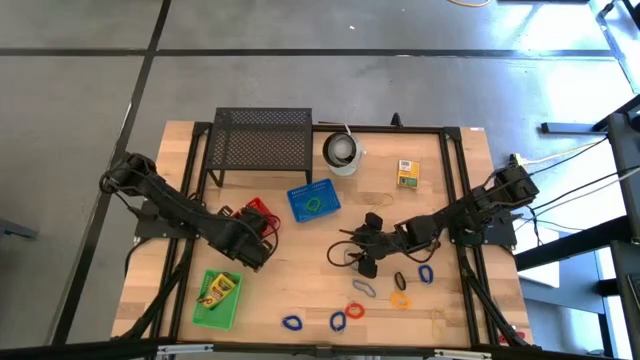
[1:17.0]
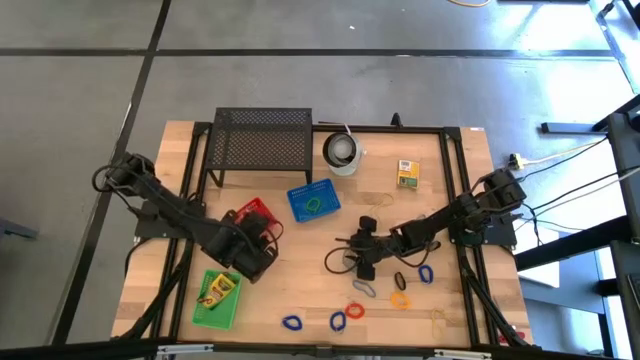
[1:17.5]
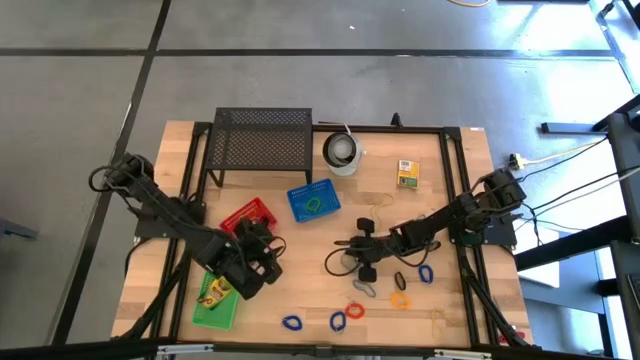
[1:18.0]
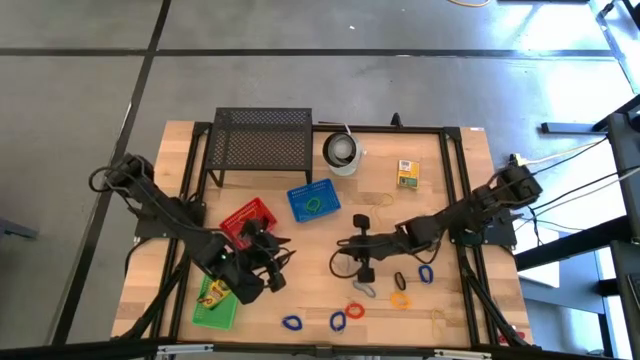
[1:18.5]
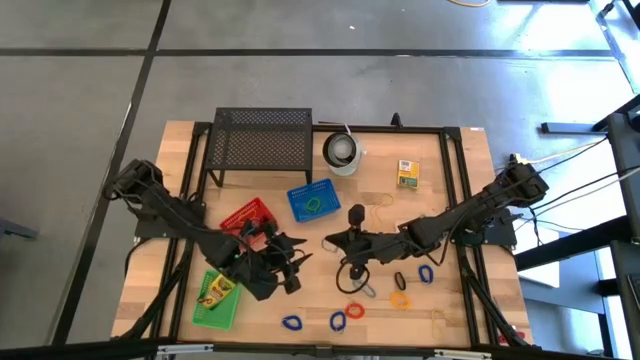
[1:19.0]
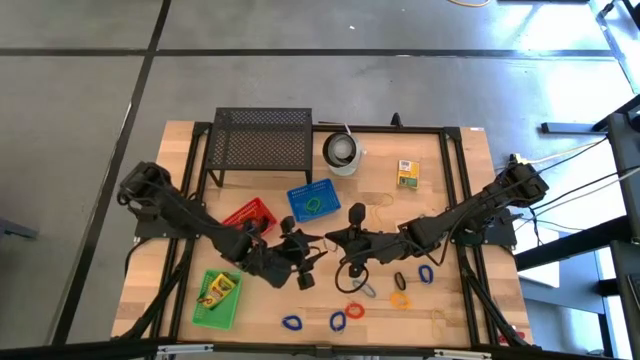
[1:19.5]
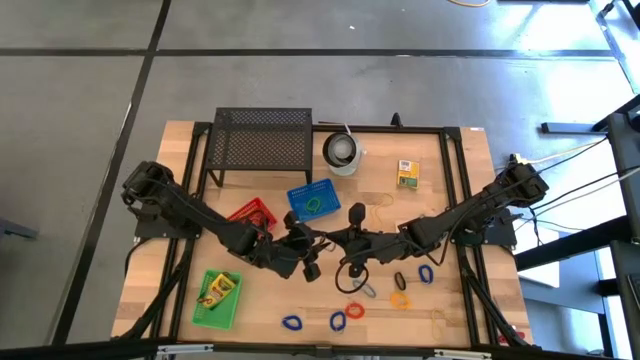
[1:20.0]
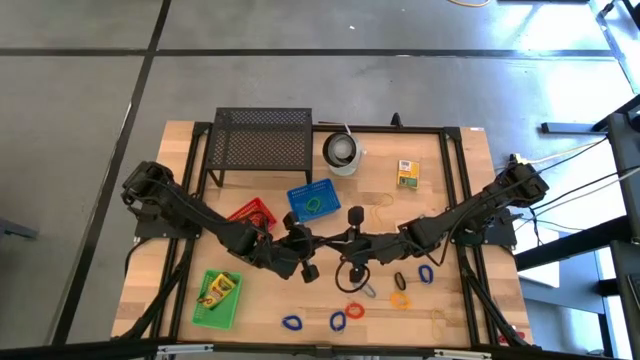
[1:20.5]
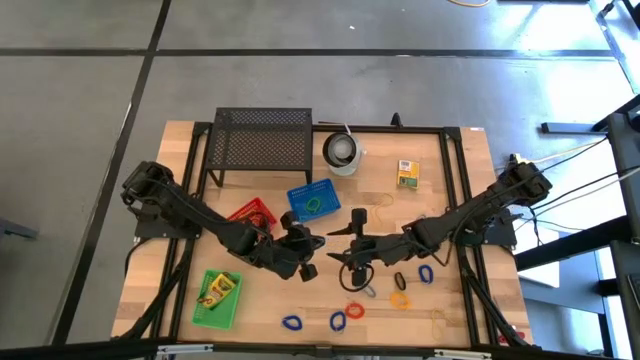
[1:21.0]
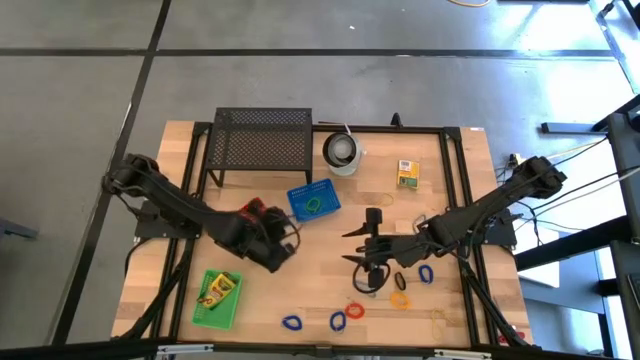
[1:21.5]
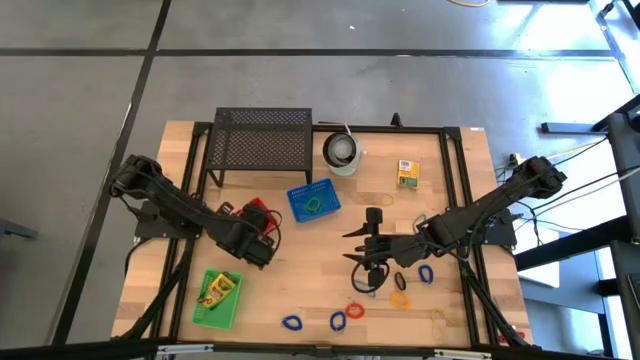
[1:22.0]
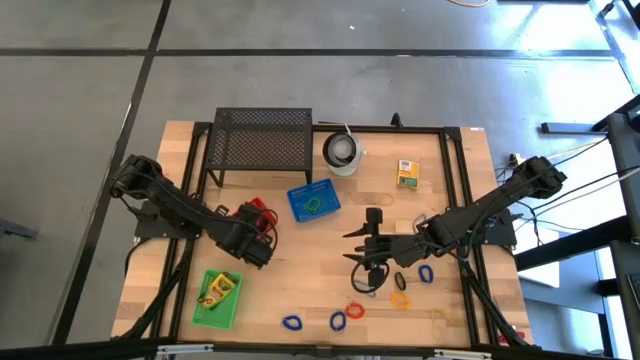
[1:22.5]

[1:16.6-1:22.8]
Task: Pick & Place Office Desk Supplies
Put the blue rubber band into the red bin

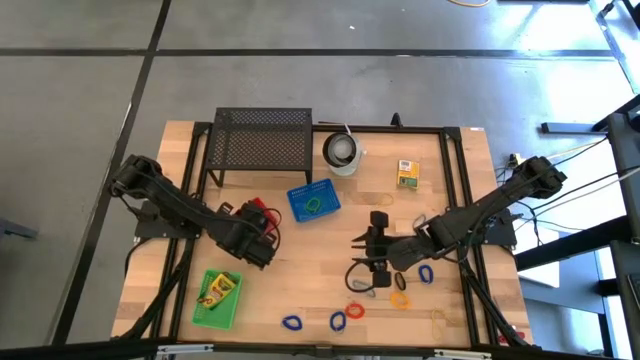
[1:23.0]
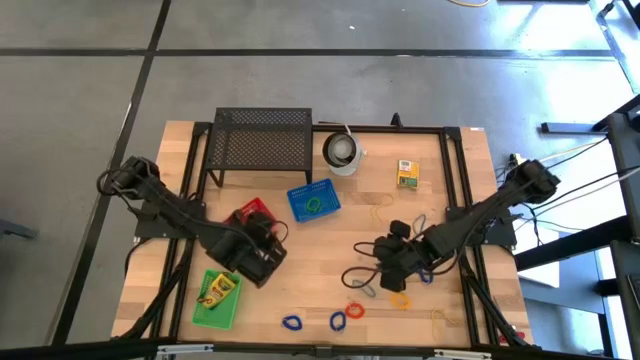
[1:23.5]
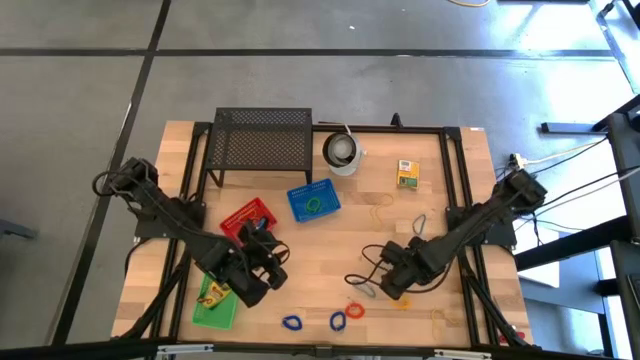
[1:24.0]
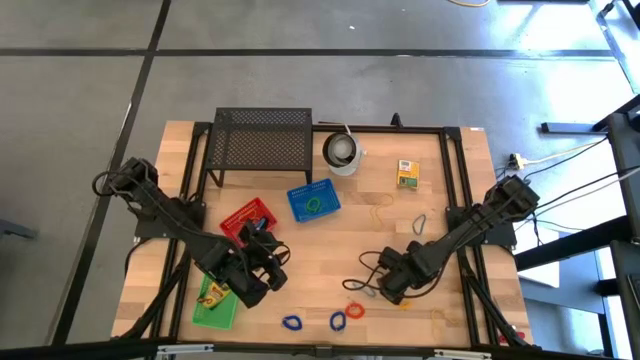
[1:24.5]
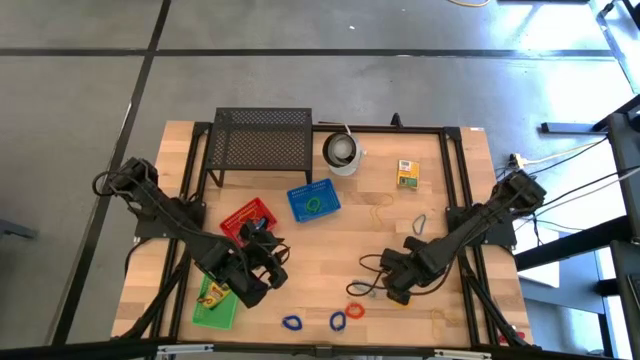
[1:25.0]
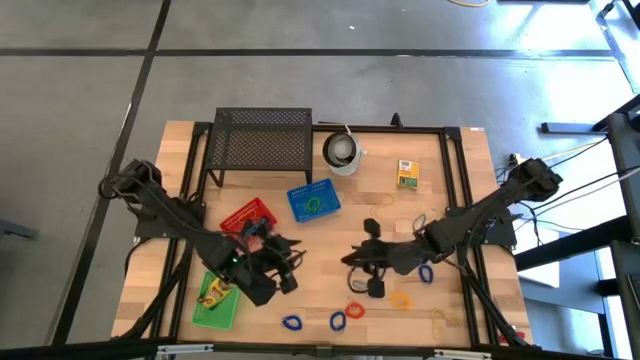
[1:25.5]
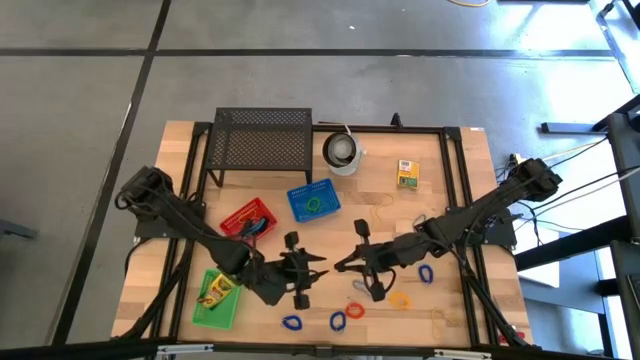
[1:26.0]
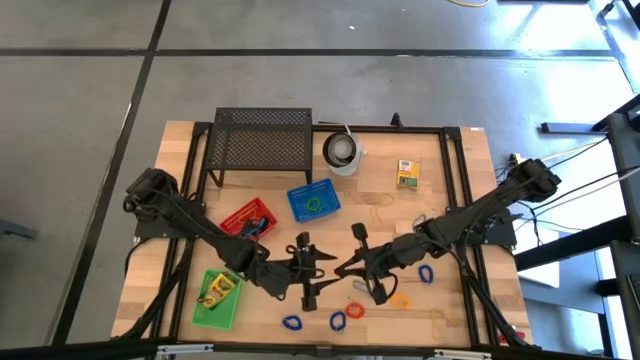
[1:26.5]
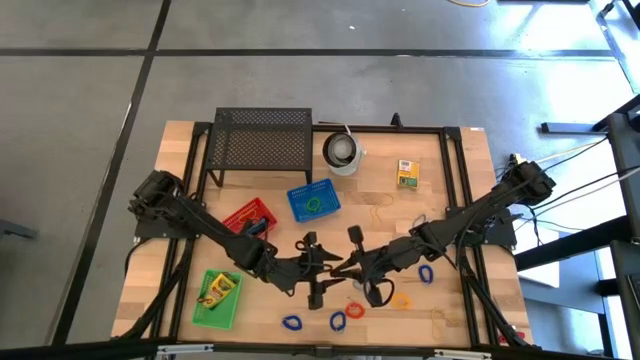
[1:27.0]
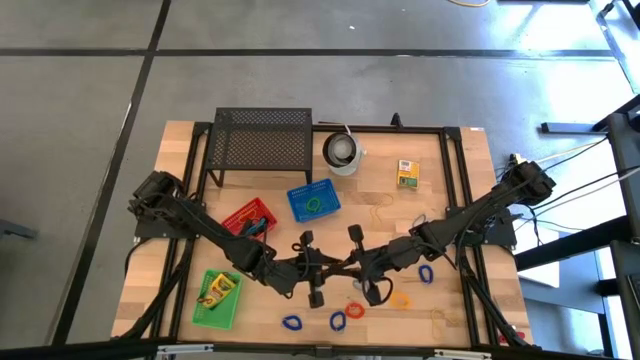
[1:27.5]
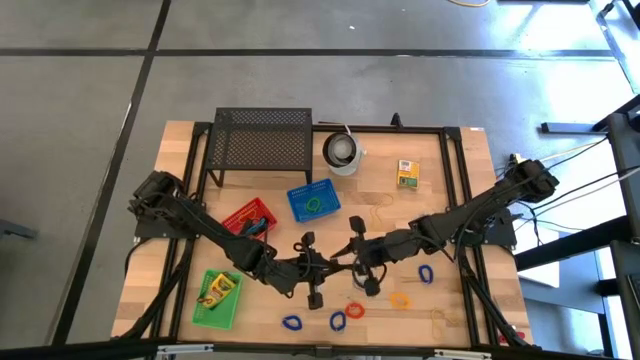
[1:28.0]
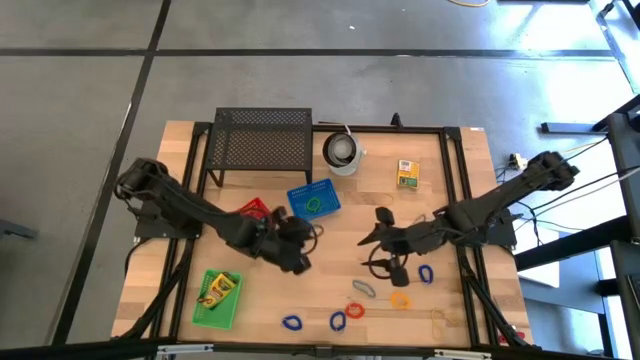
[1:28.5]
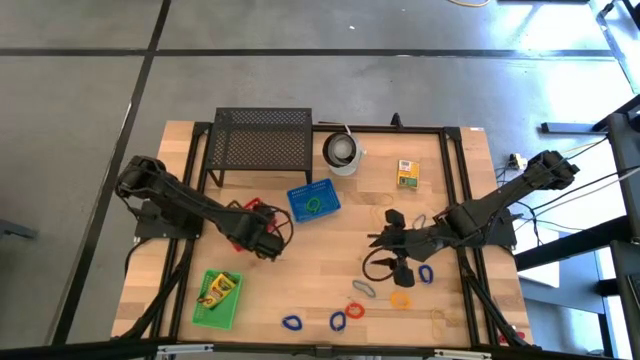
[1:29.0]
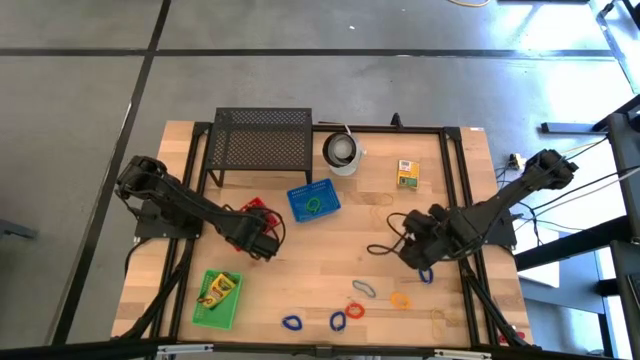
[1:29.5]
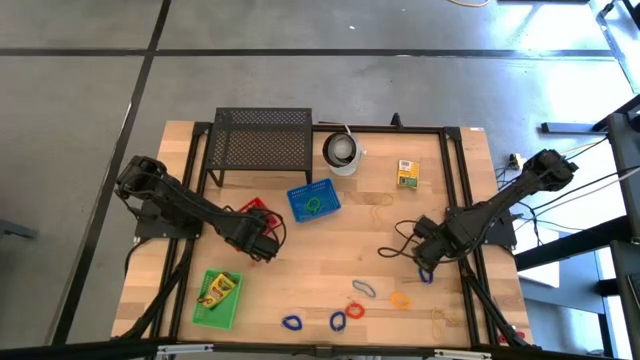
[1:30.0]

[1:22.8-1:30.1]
Put the black rubber band into the red bin

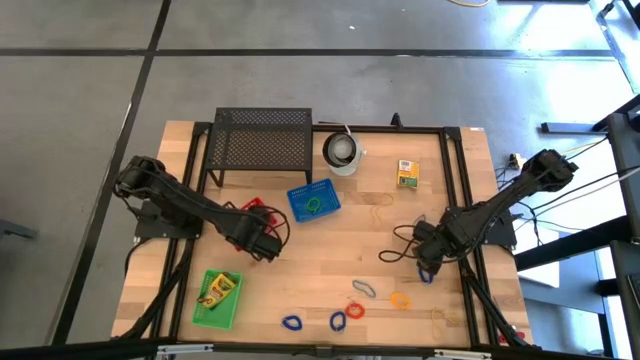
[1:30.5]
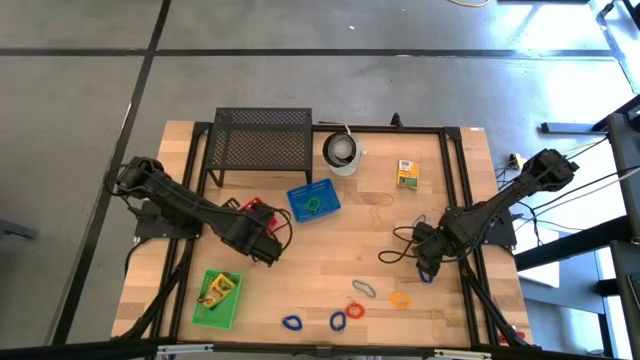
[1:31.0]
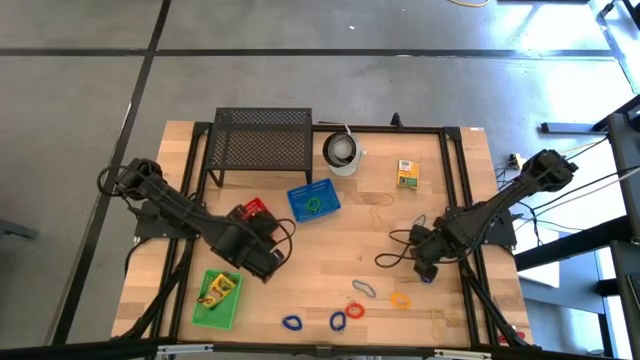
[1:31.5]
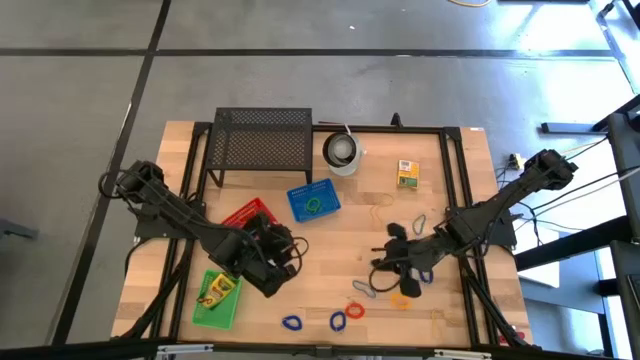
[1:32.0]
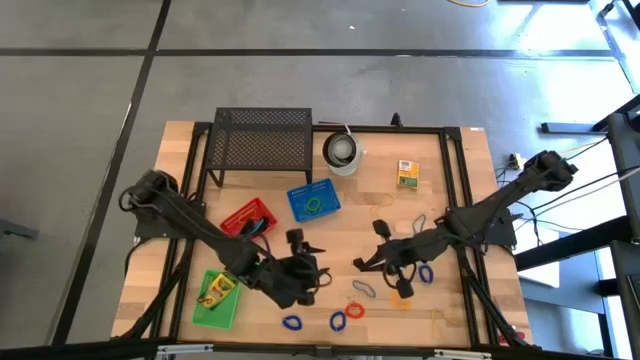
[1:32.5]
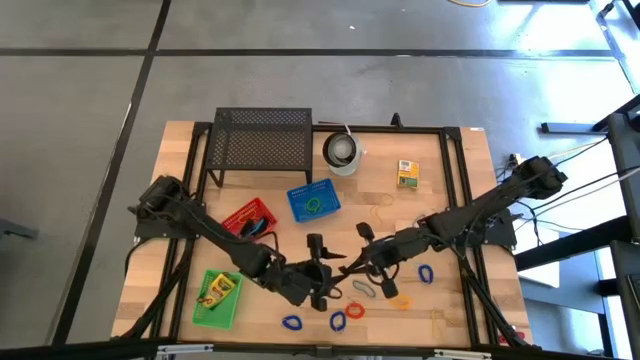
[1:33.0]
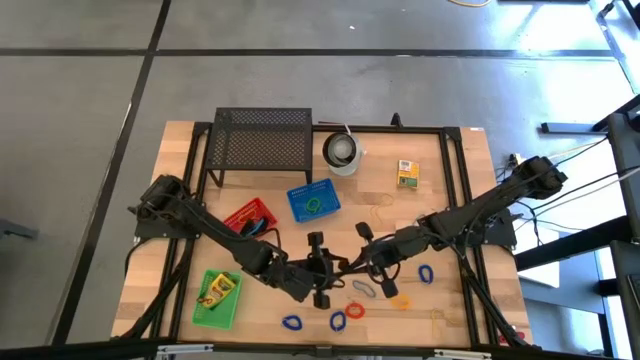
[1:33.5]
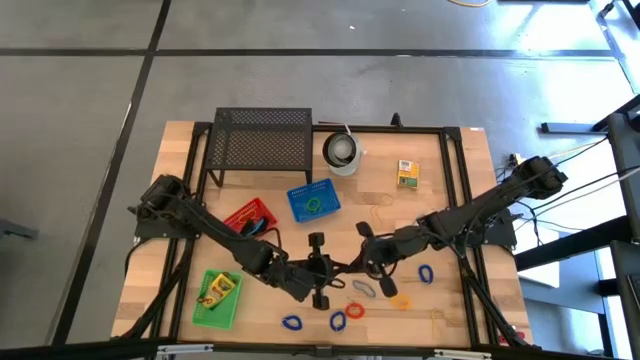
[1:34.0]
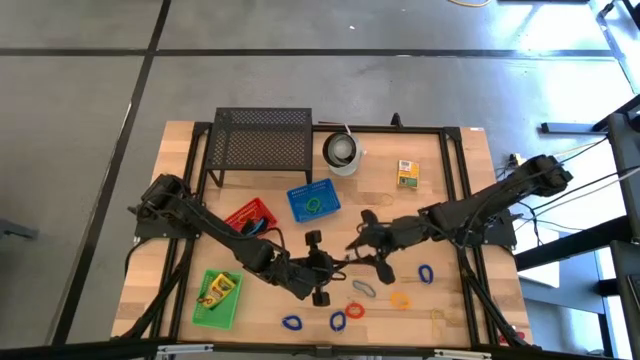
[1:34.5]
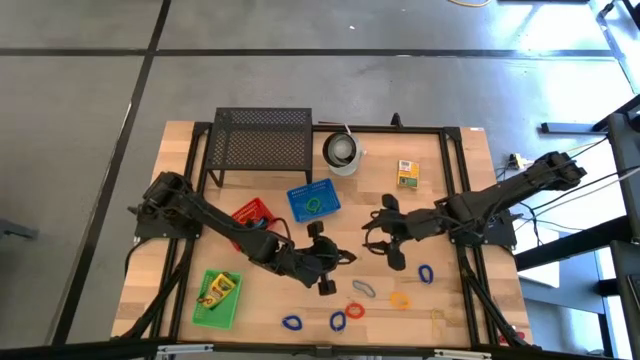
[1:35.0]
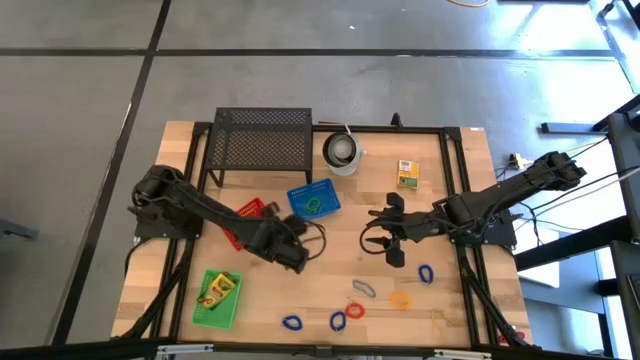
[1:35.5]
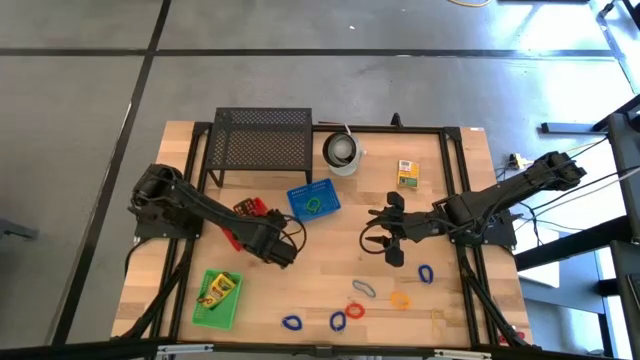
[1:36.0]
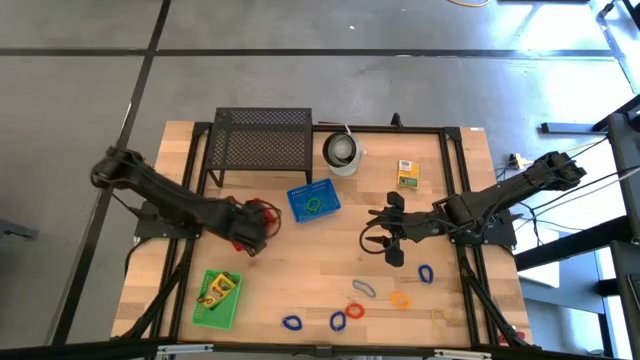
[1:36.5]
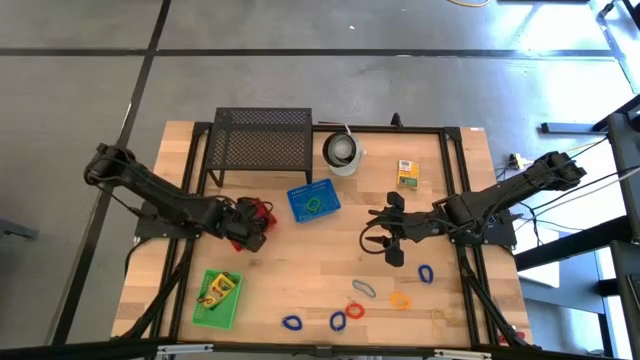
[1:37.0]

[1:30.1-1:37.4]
Put the black rubber band into the red bin

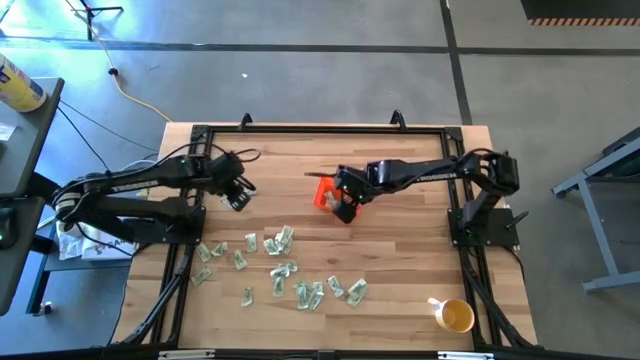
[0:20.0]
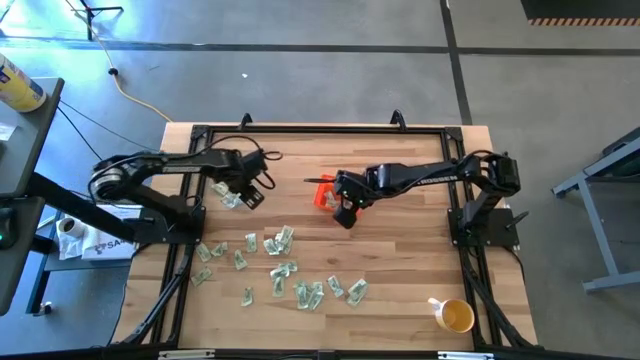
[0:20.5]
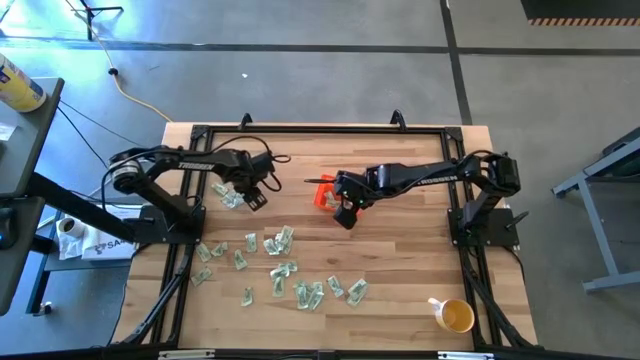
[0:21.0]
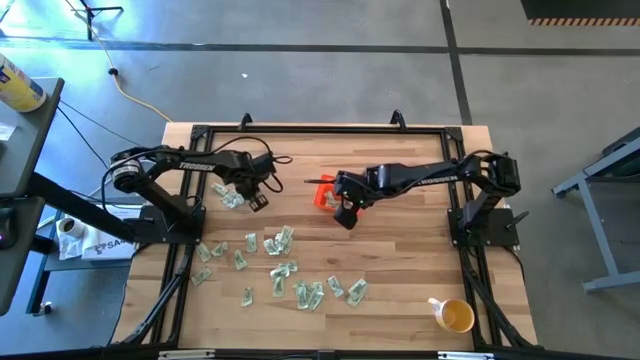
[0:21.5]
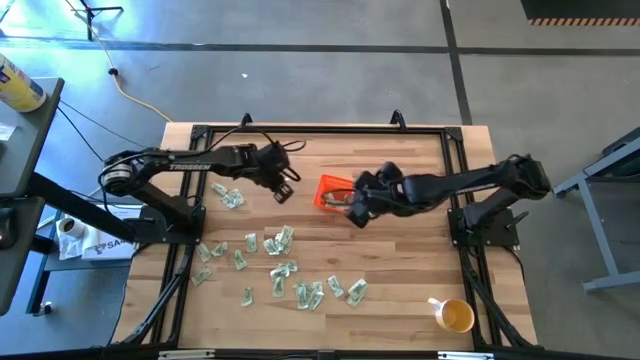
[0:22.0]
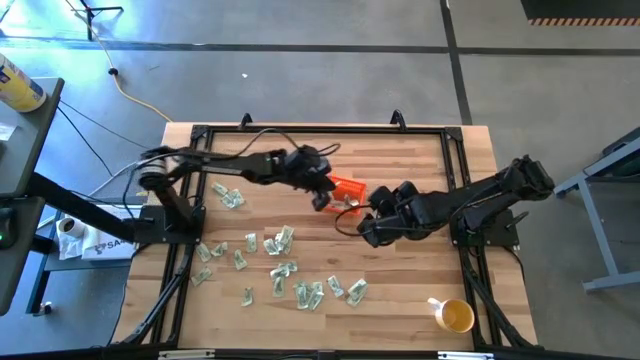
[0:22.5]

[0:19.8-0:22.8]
Task: Pick and place Stevia / Truvia into bins
Put the green stevia packet into the orange basket
